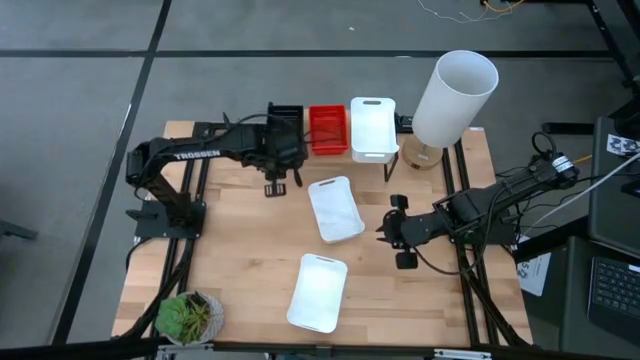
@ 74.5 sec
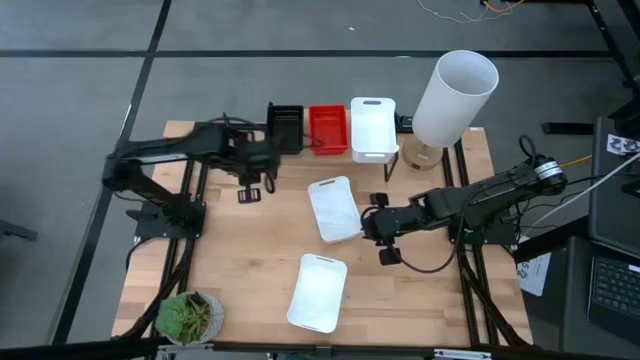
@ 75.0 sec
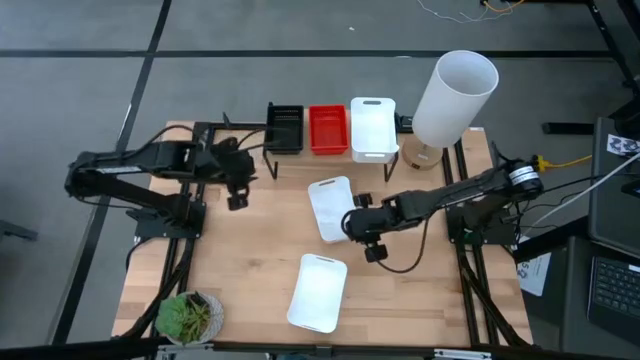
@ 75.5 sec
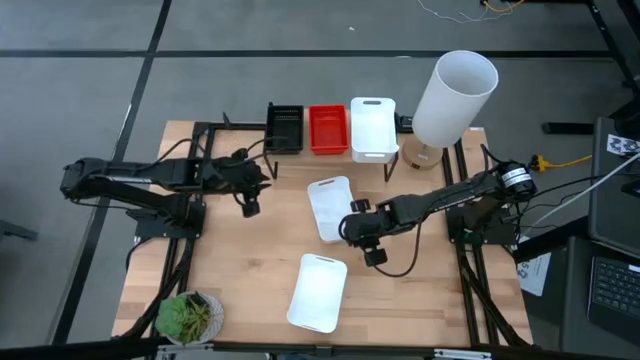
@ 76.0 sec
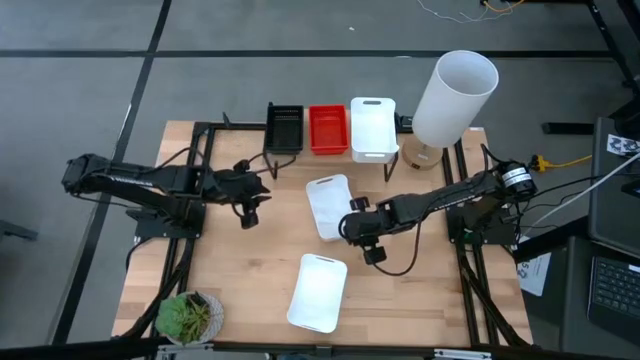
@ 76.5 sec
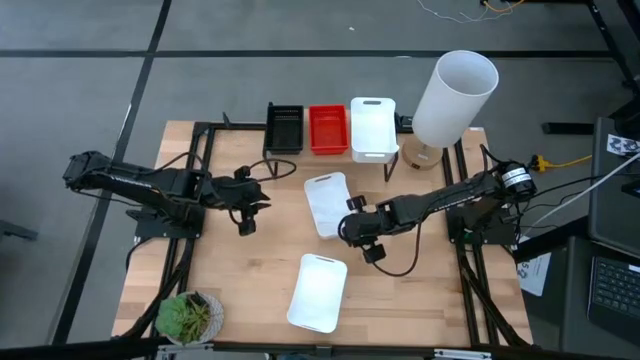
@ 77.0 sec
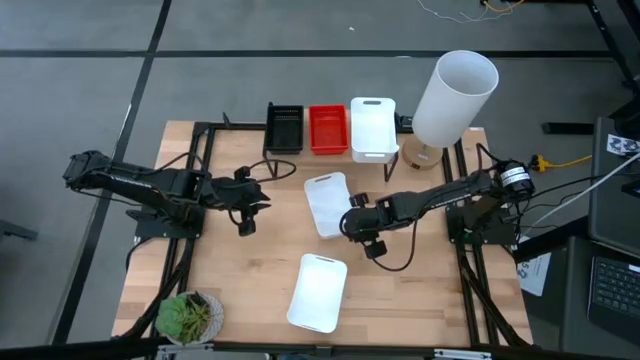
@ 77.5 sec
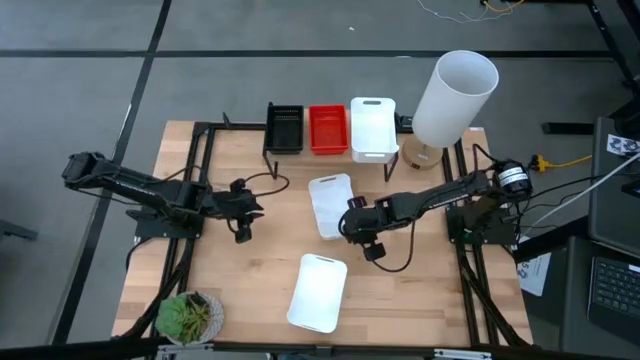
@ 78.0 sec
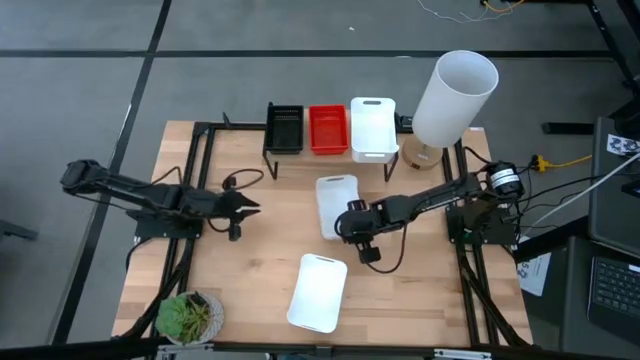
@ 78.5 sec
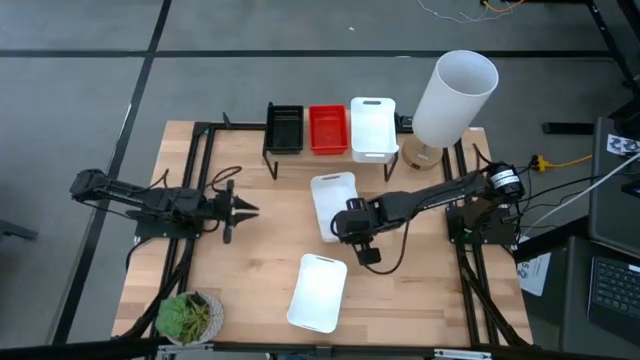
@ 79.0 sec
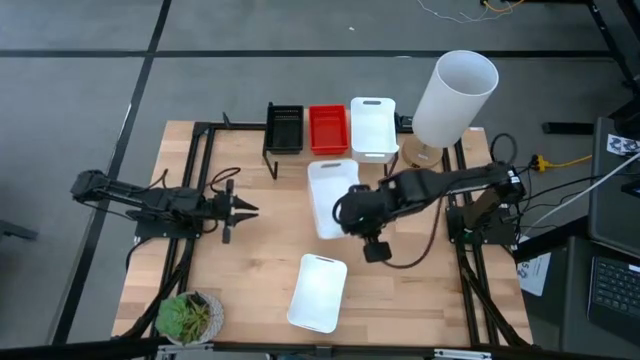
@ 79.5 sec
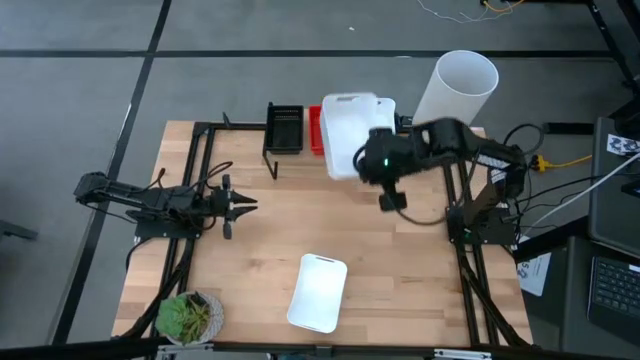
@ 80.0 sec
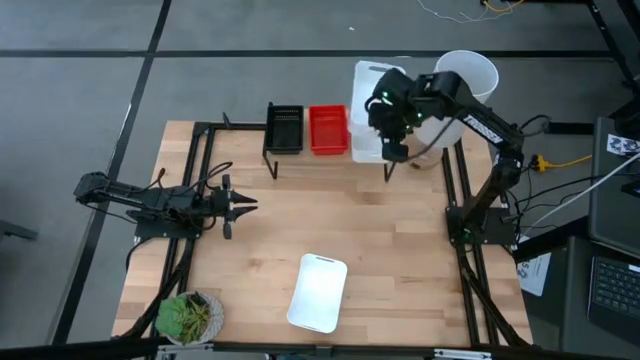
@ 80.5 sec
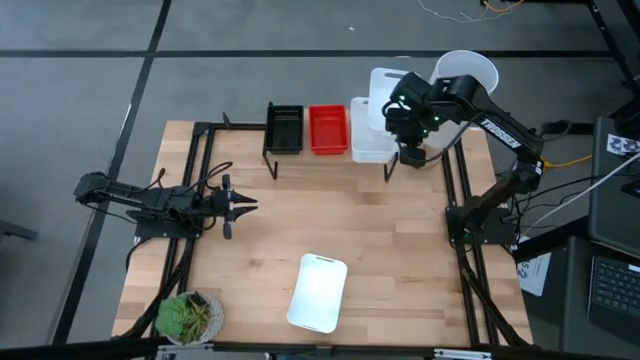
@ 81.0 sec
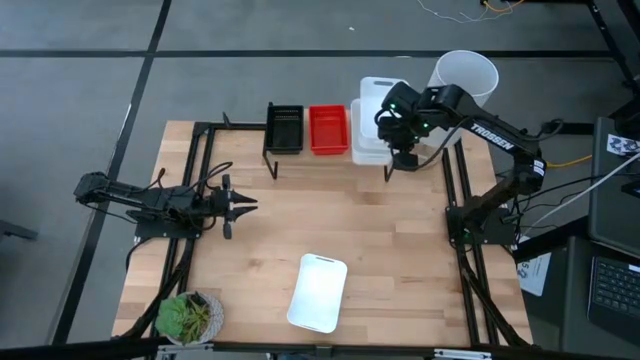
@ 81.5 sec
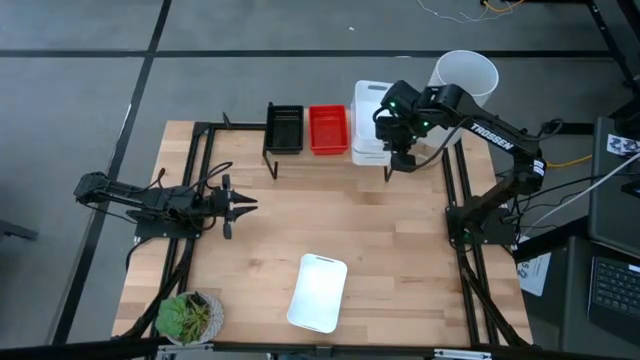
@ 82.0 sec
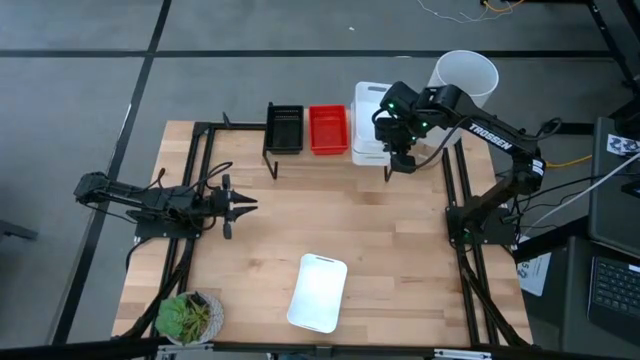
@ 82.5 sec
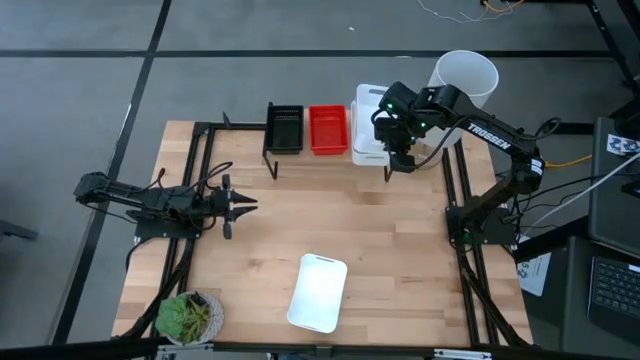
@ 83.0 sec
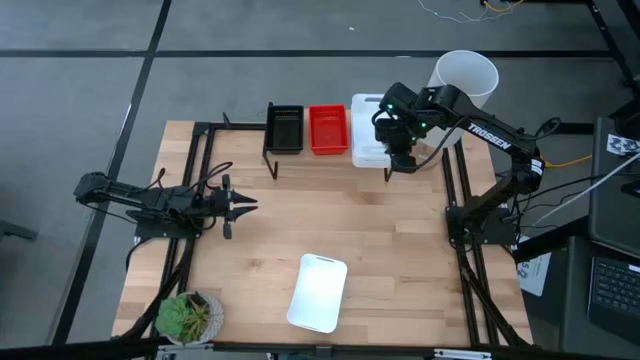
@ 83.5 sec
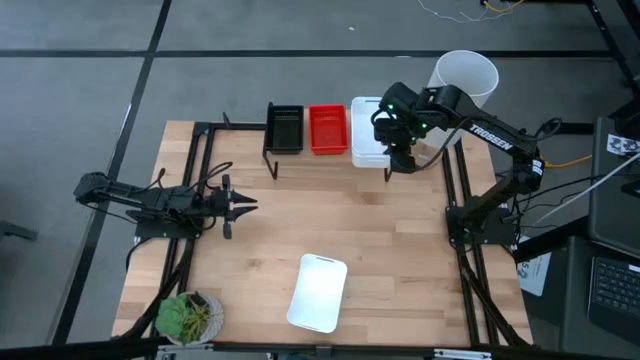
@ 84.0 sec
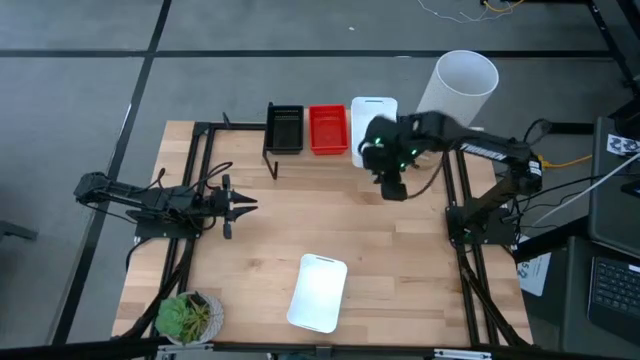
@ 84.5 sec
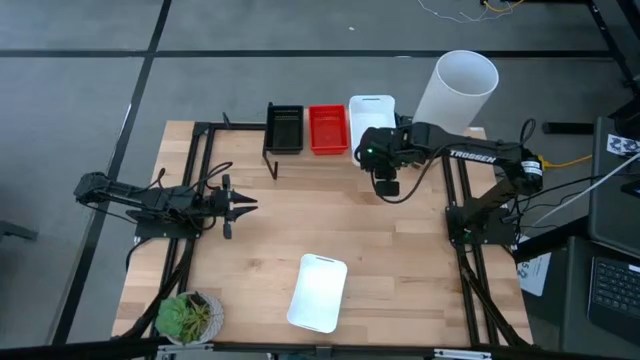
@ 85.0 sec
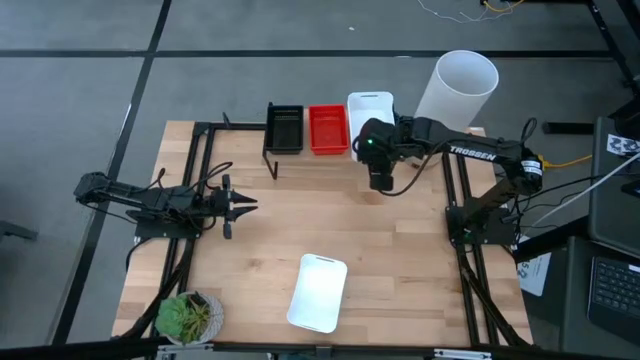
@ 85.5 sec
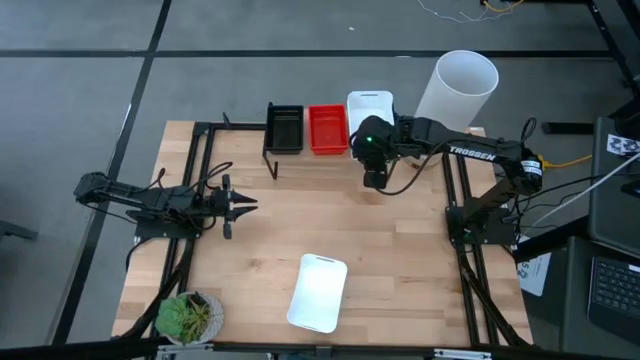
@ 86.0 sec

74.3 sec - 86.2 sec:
Task: Stack baskets on shelf by color
Stack the top white bin on top of the white bin on the shelf

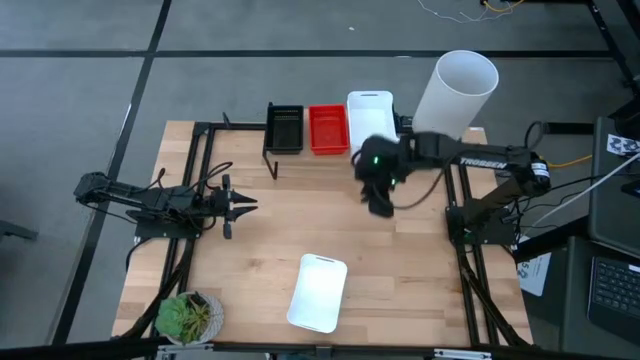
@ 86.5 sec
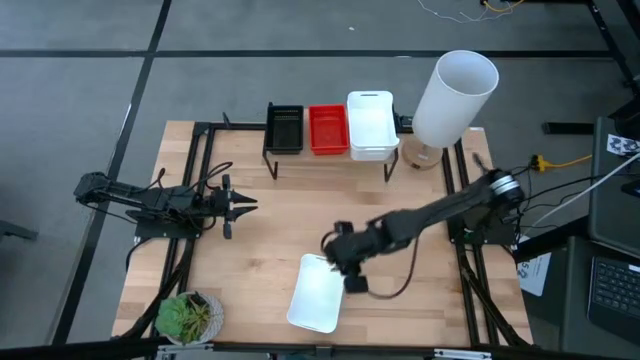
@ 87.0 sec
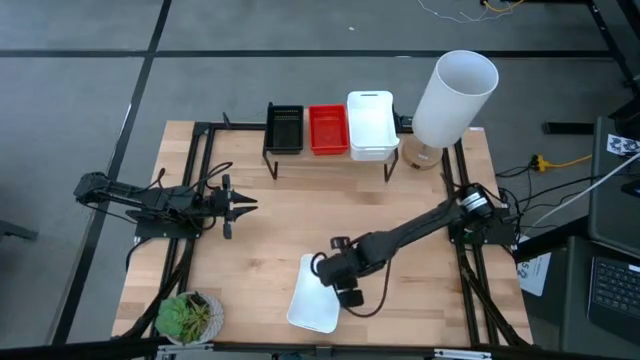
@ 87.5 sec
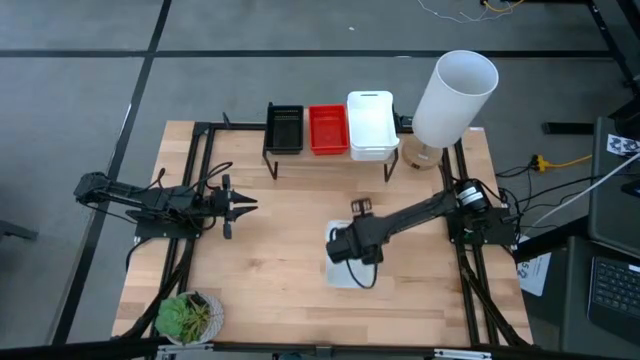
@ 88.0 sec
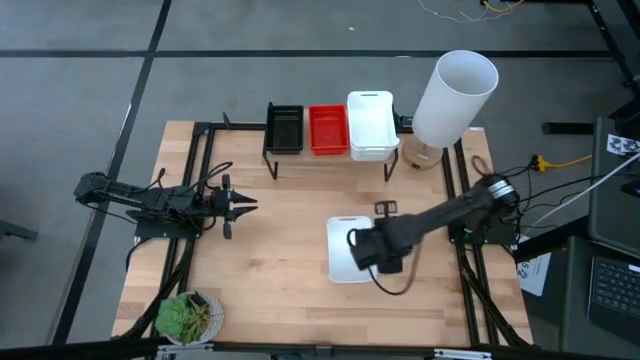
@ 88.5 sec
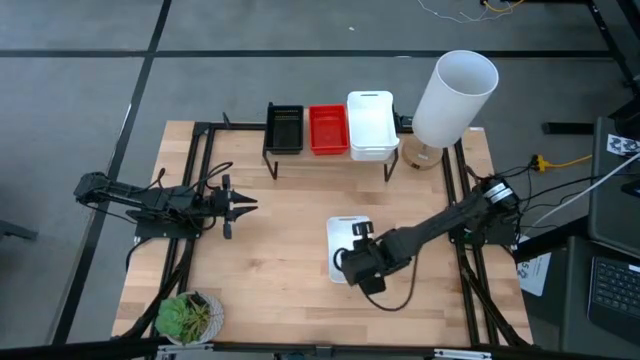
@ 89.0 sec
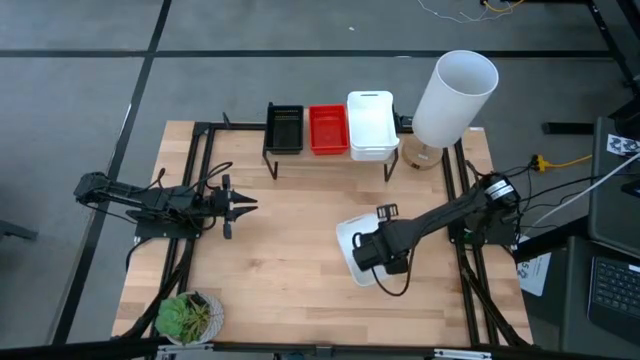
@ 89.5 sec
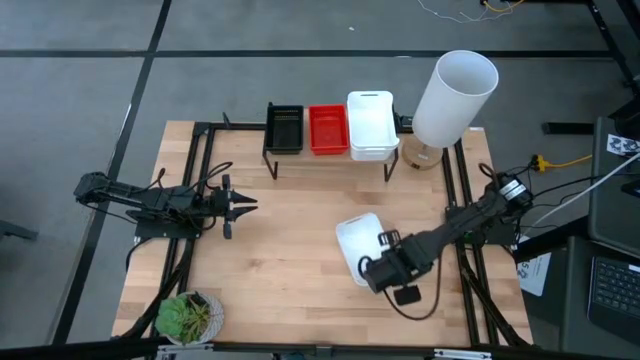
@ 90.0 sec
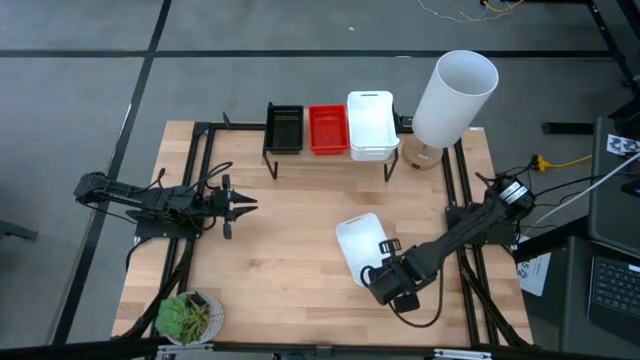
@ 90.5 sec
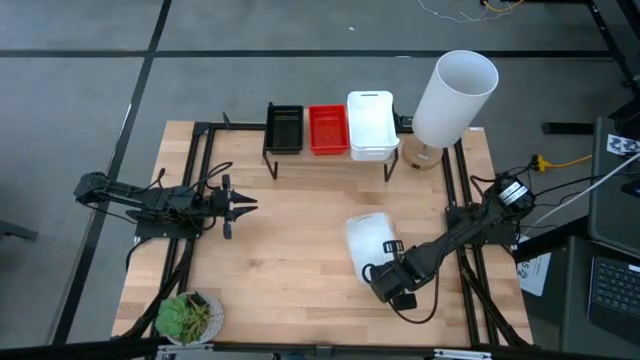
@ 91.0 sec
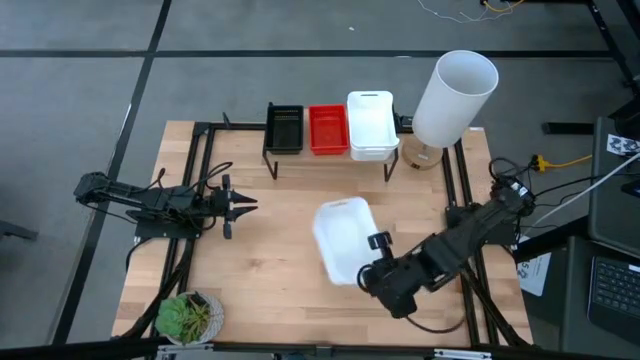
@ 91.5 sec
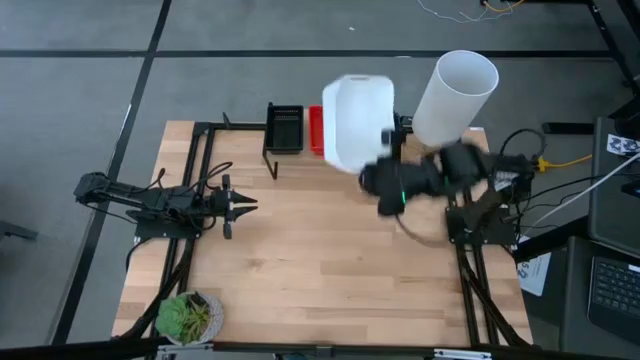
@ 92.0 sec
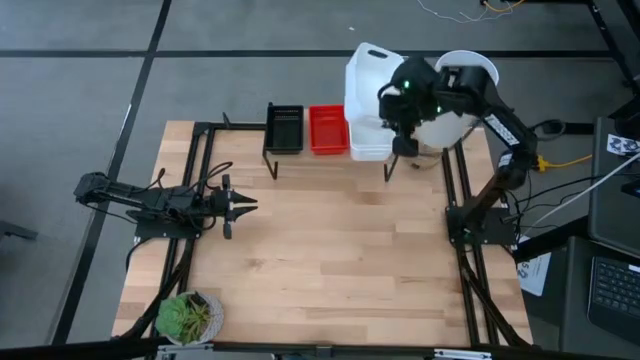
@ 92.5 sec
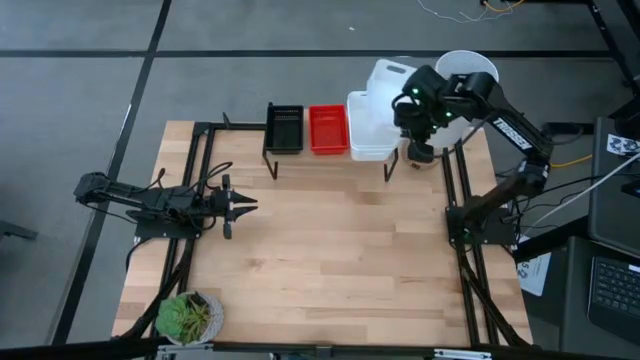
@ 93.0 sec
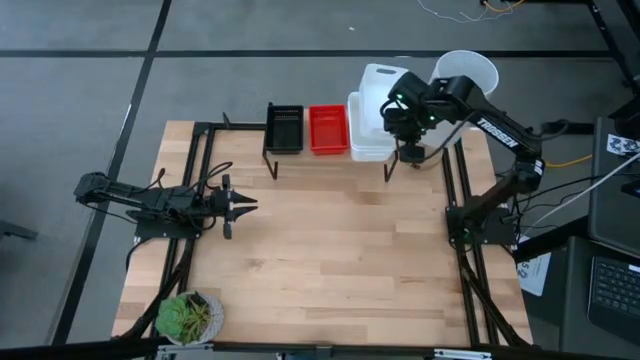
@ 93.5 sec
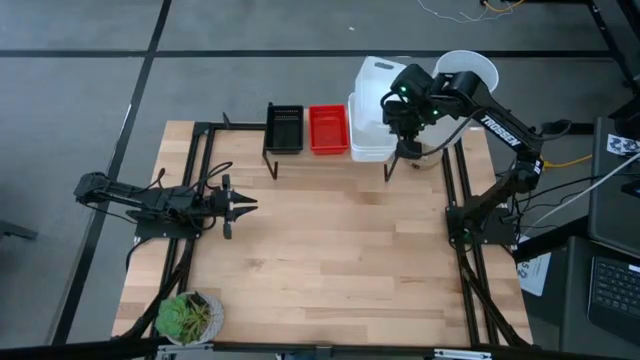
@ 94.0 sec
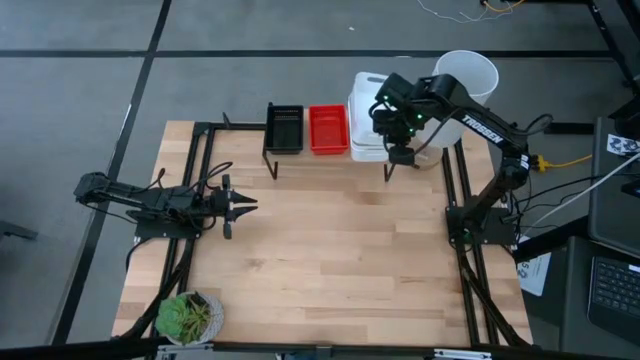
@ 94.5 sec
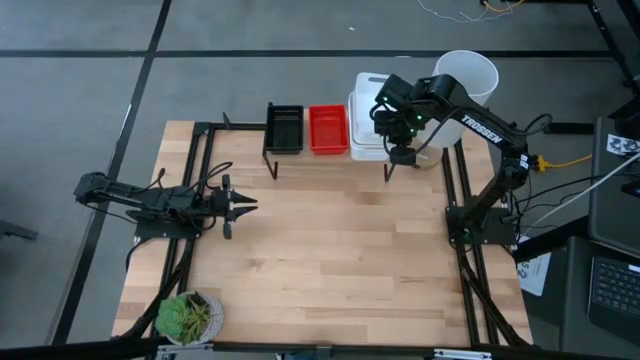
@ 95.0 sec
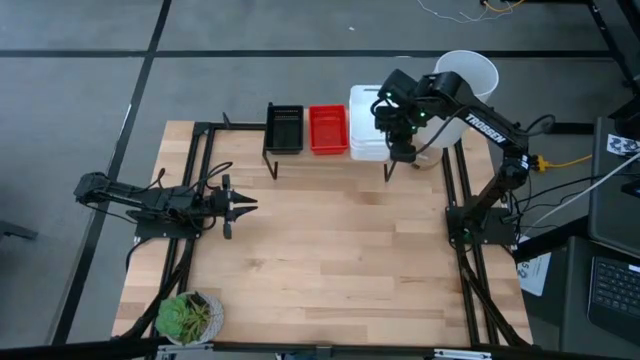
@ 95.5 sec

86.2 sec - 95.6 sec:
Stack the white bin on top of the other white bin on the shelf
